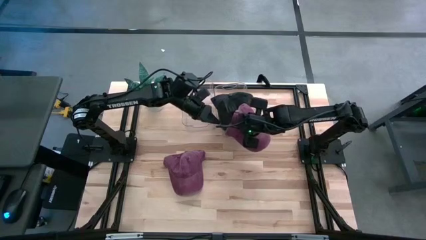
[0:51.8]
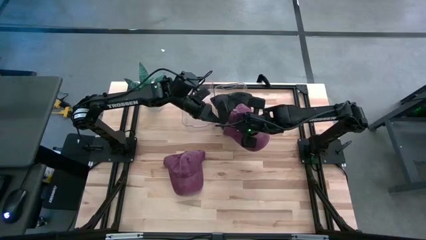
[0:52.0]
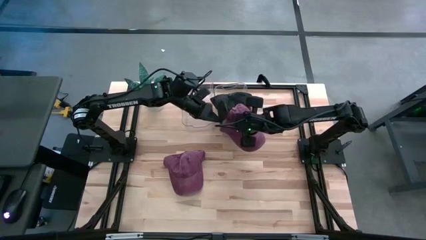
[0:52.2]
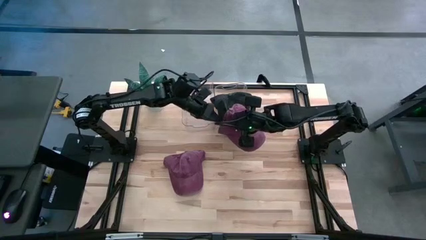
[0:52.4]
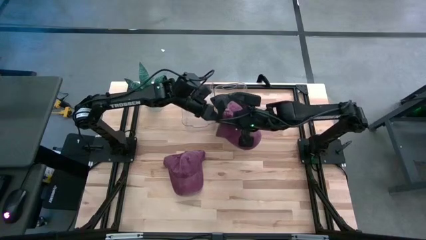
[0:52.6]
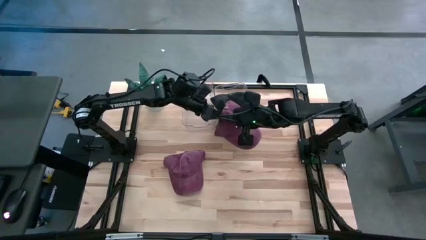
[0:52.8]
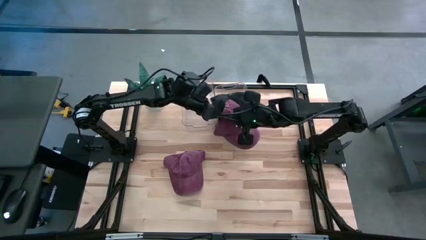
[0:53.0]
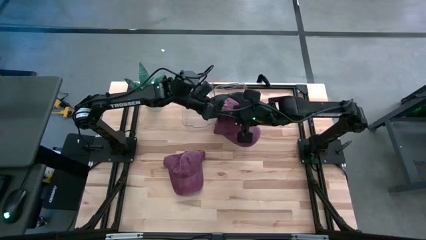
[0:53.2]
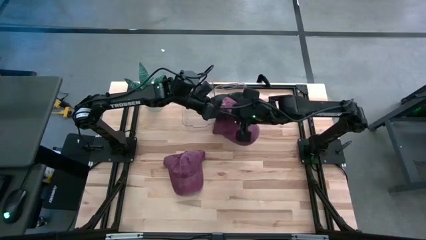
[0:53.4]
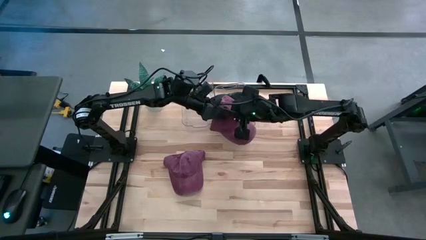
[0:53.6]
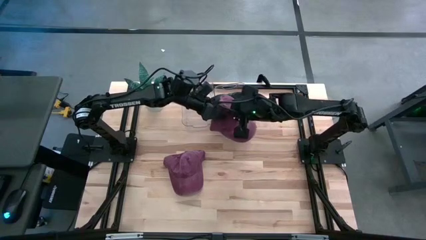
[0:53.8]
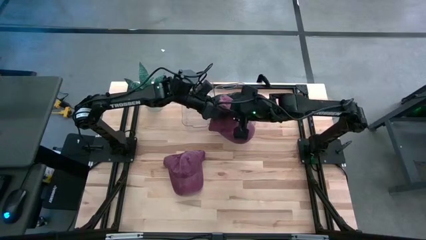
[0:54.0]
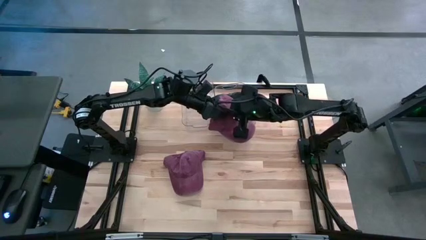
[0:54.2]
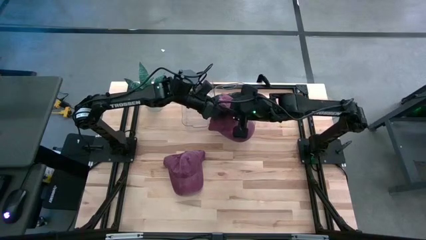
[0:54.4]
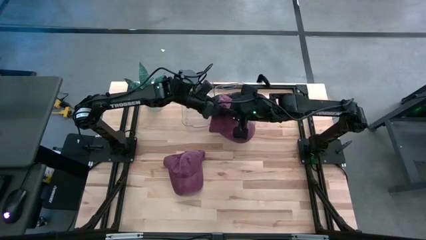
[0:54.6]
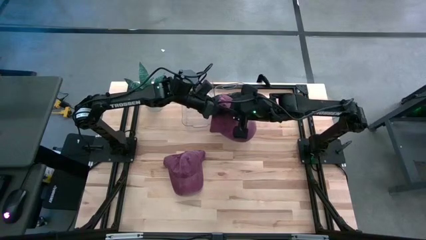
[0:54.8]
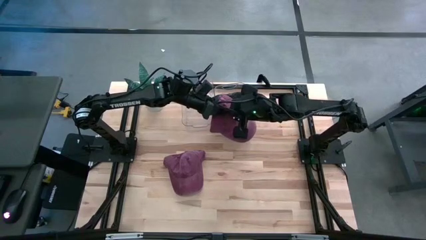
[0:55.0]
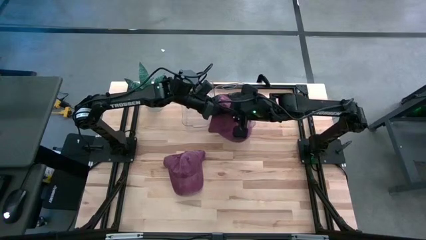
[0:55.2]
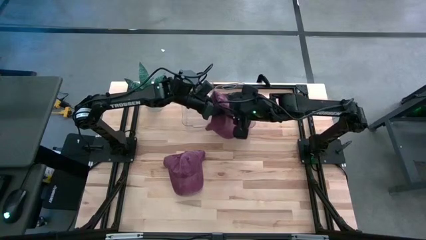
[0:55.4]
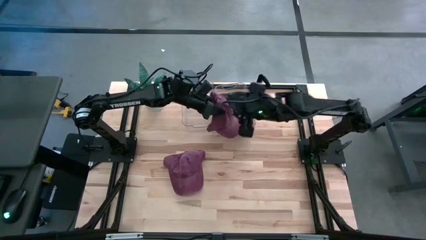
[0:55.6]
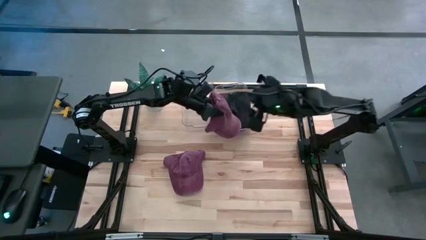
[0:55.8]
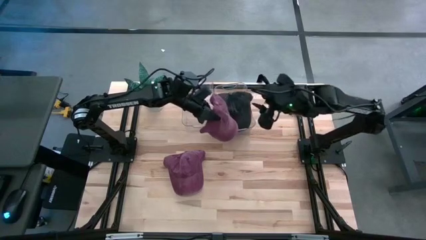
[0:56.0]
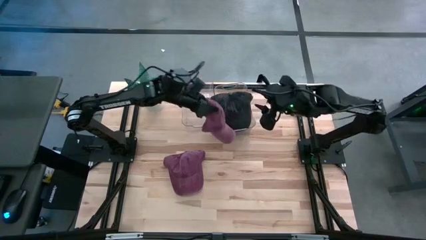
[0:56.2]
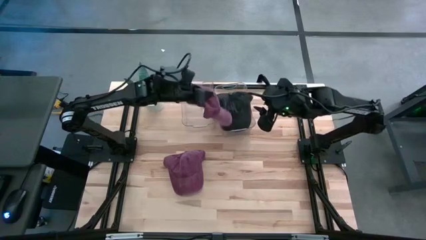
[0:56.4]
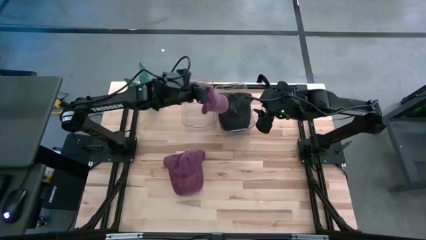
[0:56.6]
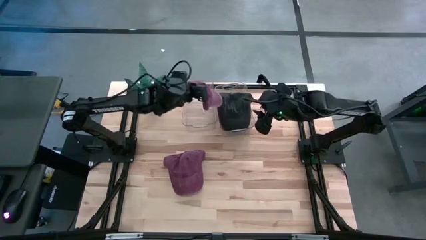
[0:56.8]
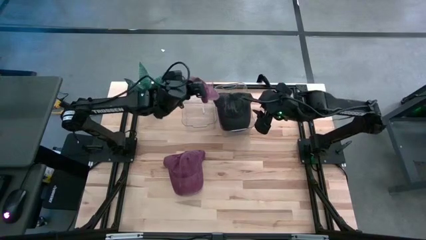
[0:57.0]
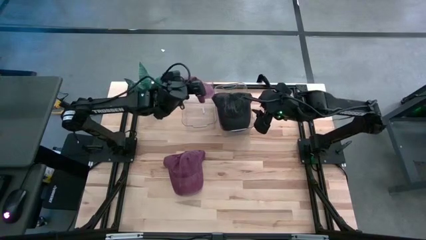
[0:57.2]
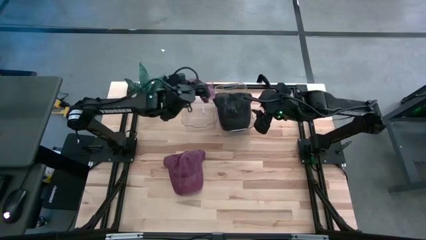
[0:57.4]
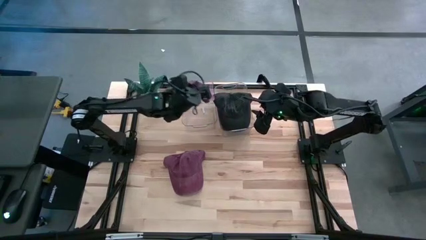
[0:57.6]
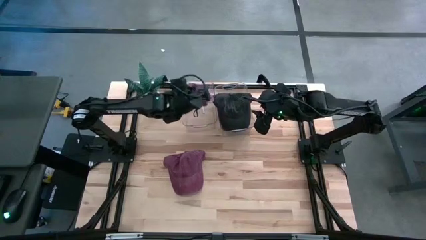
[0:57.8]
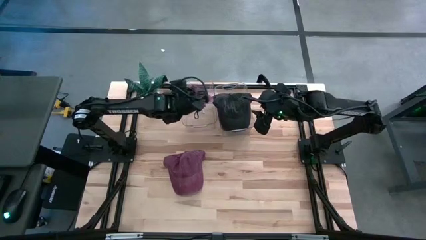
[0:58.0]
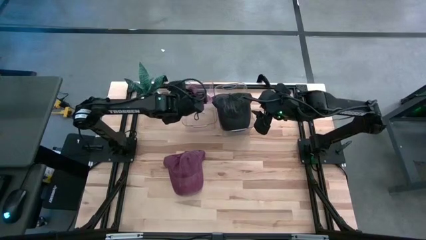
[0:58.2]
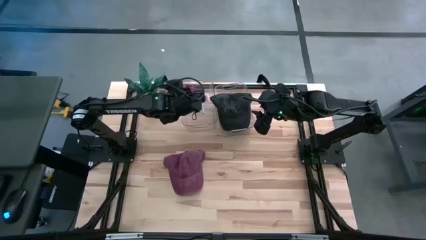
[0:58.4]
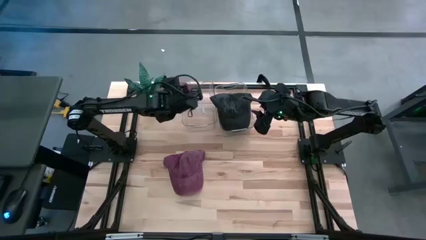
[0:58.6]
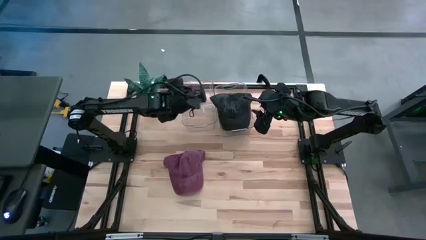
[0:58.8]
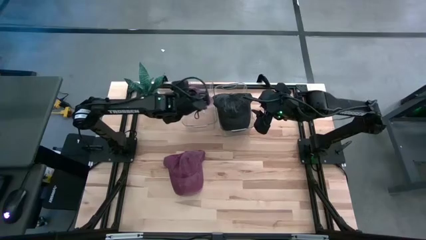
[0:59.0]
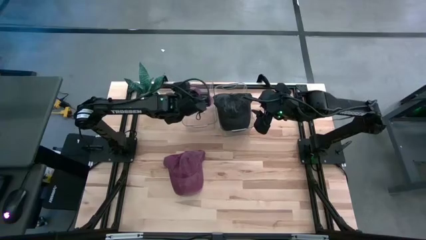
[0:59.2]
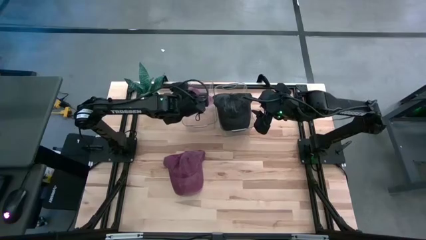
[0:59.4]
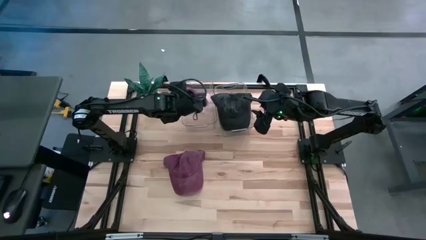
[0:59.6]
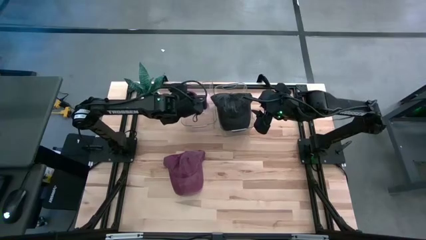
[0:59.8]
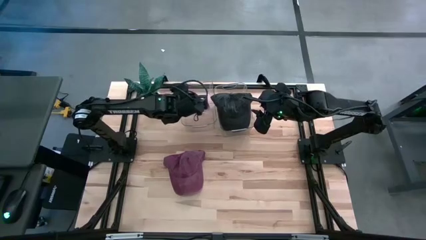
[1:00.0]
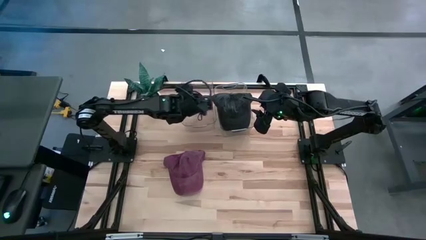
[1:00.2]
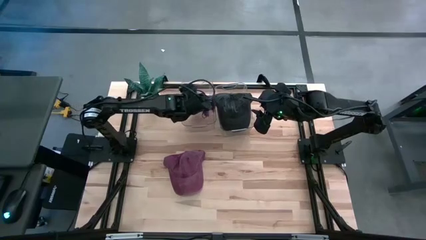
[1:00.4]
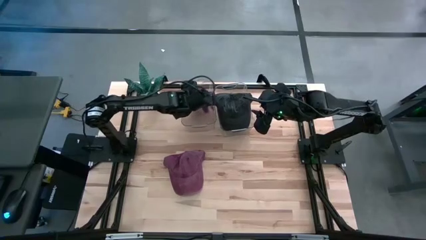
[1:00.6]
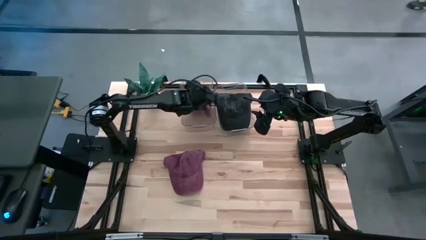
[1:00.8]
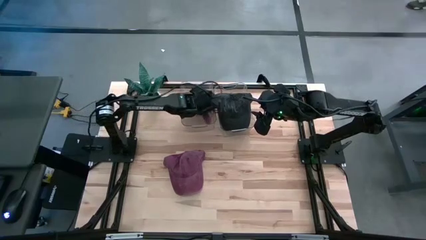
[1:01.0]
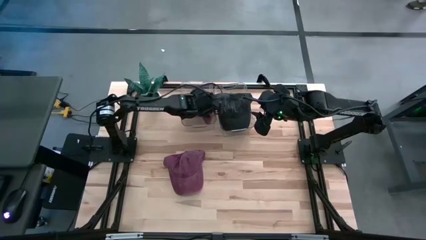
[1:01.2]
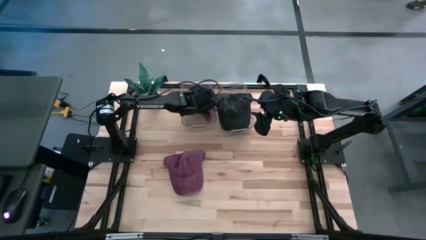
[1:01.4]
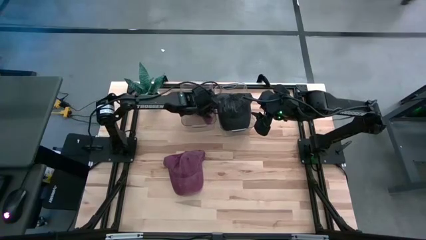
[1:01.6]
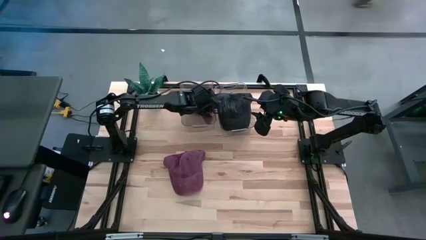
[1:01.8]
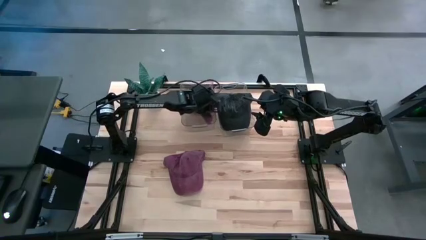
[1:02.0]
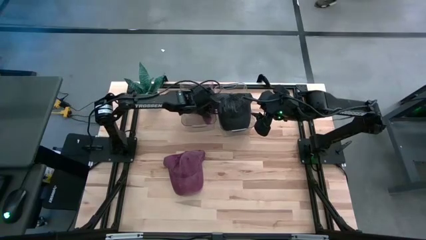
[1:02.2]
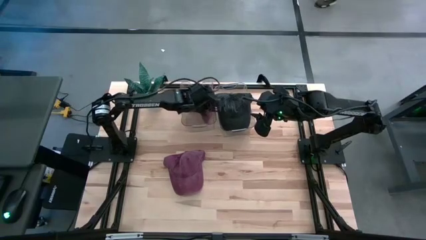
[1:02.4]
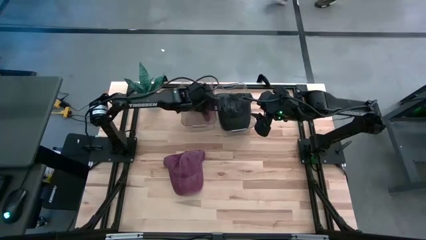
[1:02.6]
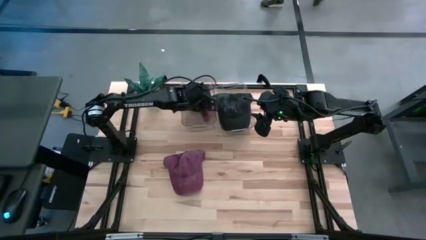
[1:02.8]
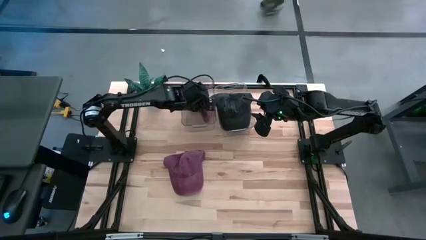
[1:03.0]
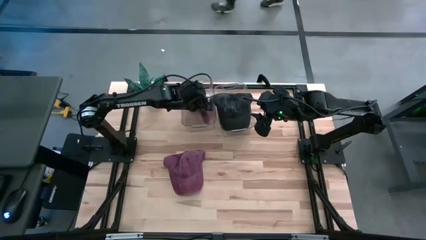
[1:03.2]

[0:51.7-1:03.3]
Task: Pick & Place hat
Put the right dark red cap into the left transparent bin
